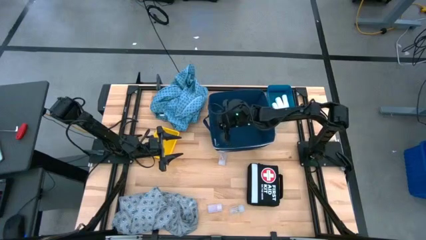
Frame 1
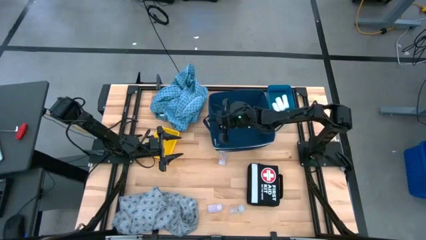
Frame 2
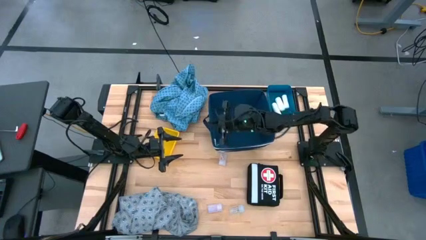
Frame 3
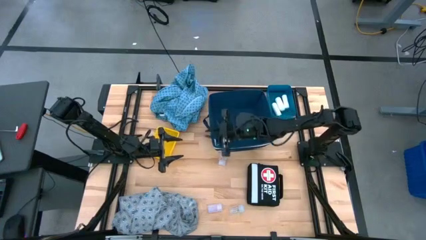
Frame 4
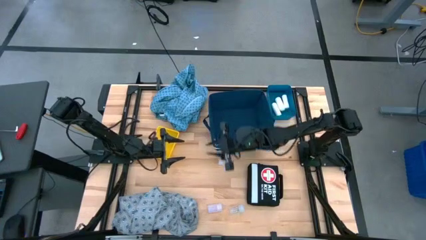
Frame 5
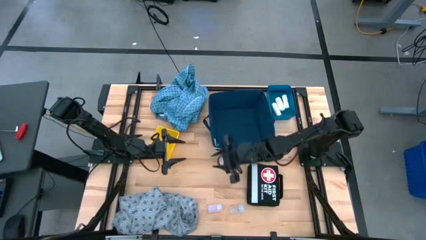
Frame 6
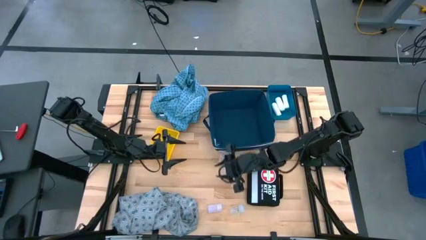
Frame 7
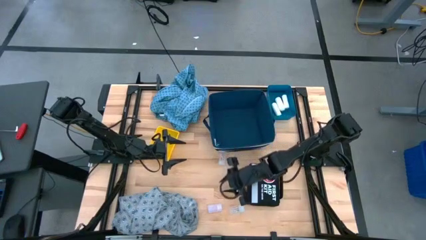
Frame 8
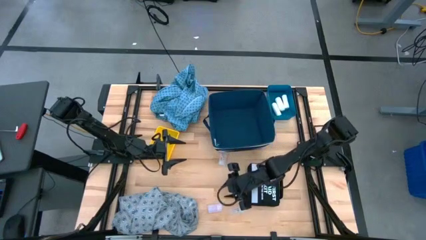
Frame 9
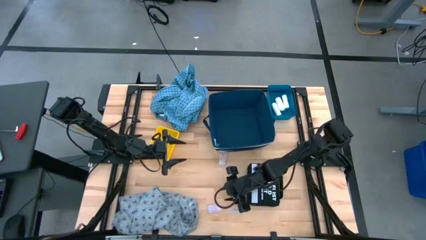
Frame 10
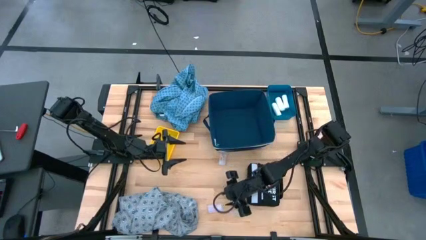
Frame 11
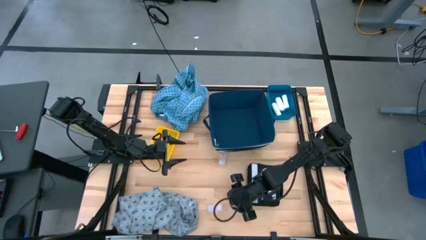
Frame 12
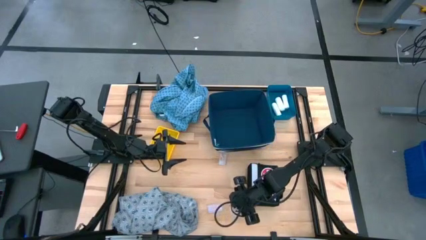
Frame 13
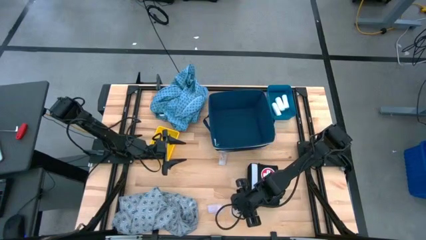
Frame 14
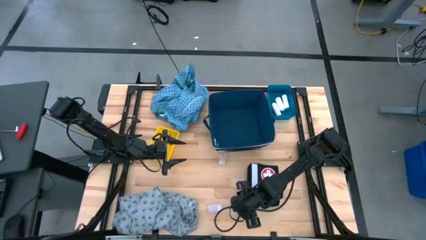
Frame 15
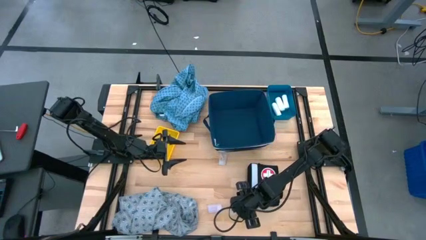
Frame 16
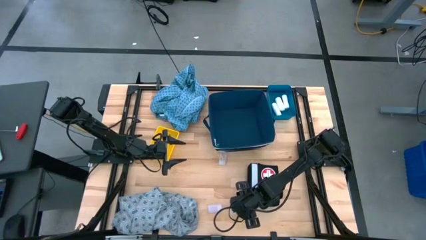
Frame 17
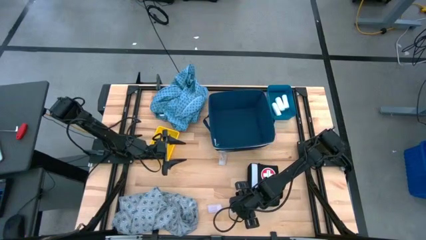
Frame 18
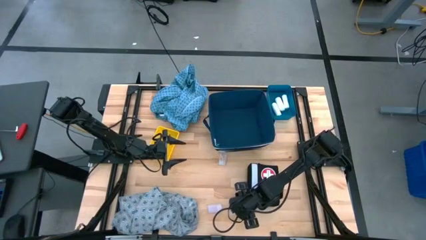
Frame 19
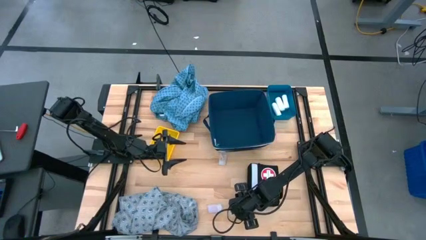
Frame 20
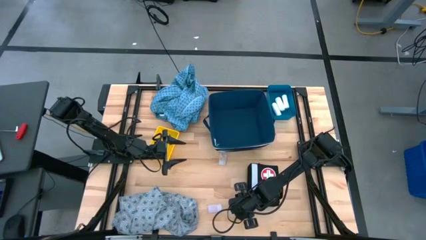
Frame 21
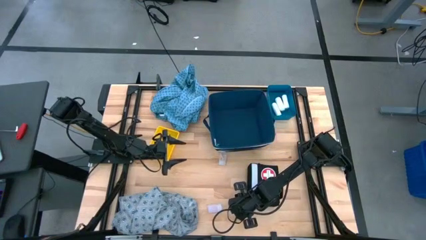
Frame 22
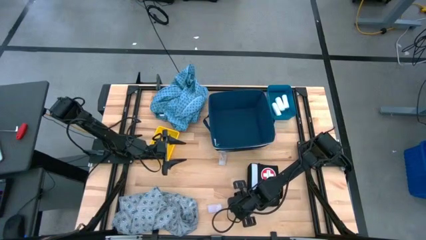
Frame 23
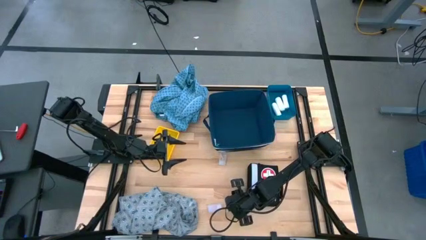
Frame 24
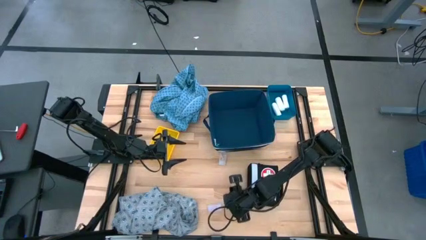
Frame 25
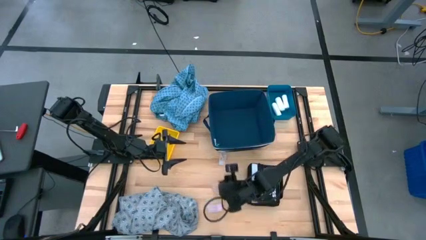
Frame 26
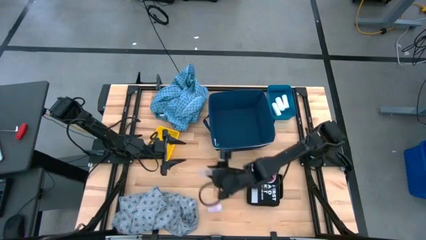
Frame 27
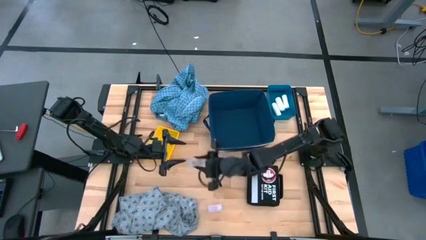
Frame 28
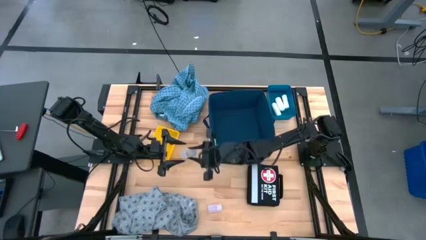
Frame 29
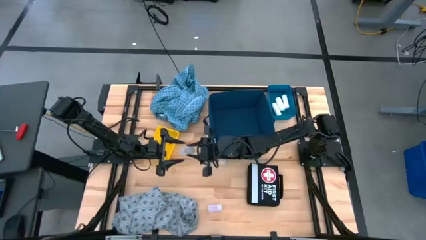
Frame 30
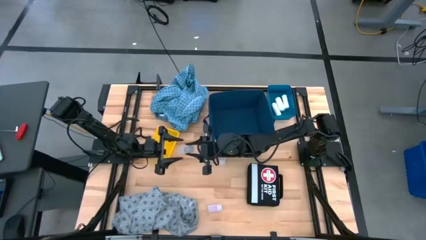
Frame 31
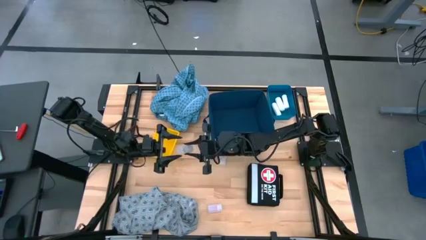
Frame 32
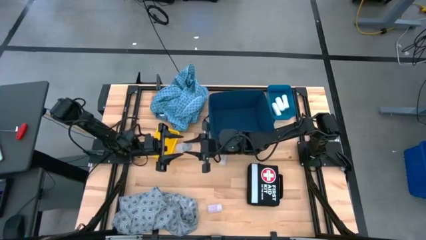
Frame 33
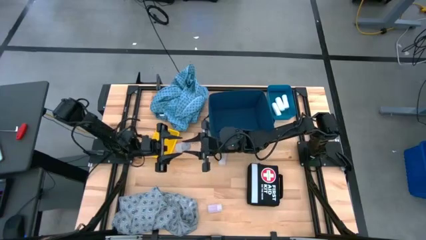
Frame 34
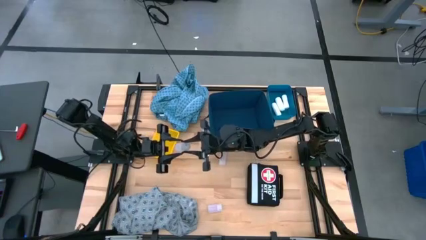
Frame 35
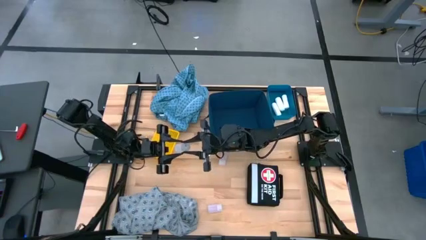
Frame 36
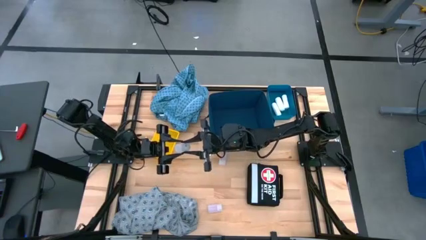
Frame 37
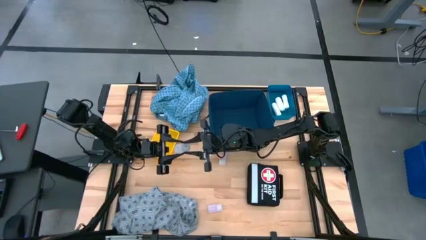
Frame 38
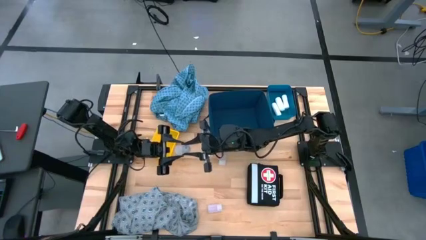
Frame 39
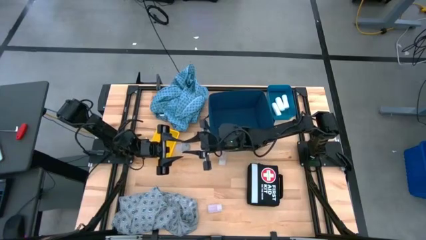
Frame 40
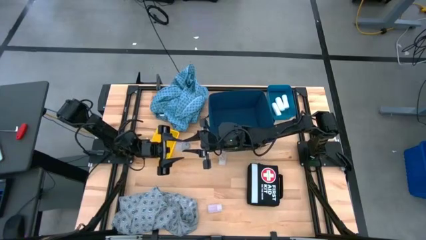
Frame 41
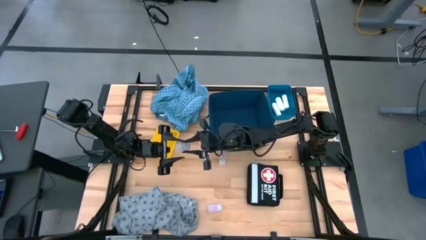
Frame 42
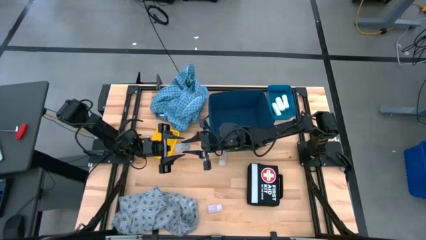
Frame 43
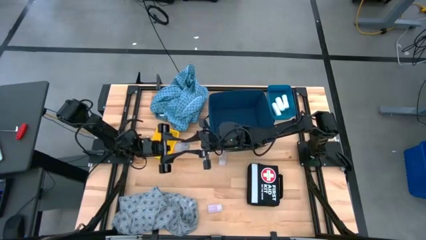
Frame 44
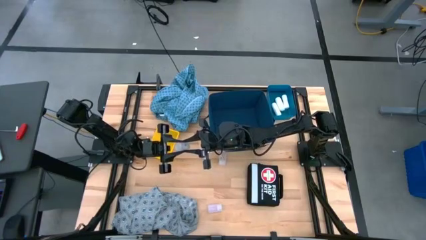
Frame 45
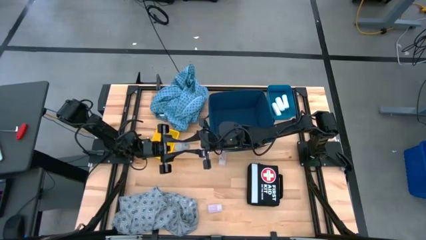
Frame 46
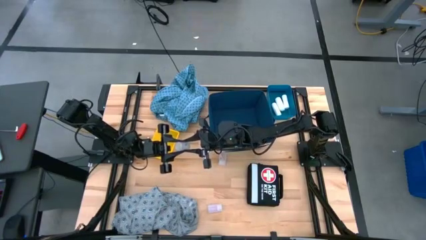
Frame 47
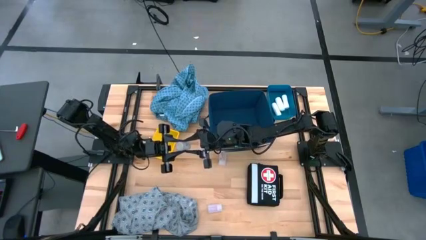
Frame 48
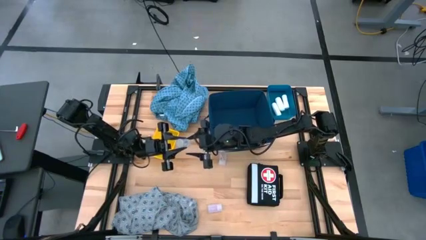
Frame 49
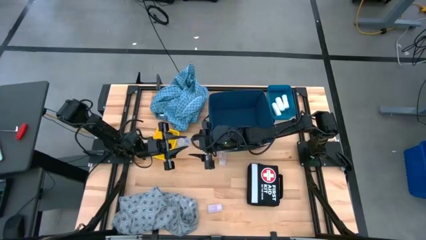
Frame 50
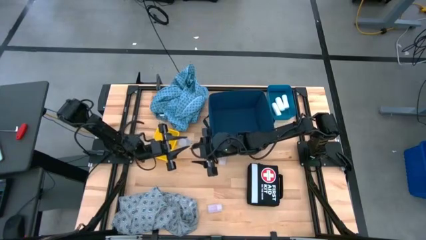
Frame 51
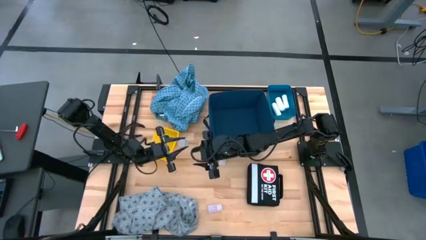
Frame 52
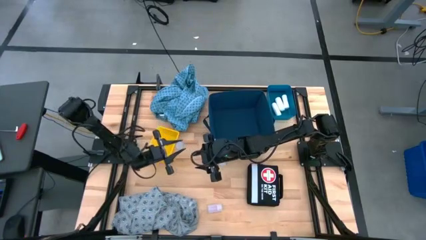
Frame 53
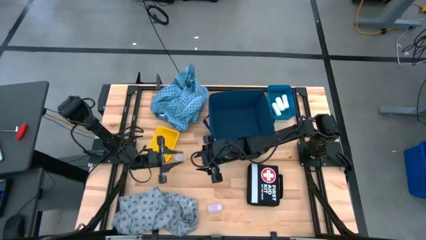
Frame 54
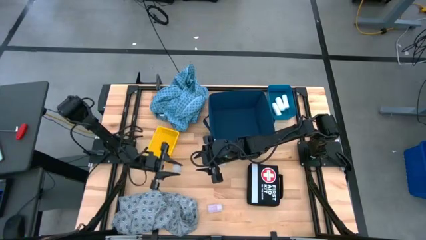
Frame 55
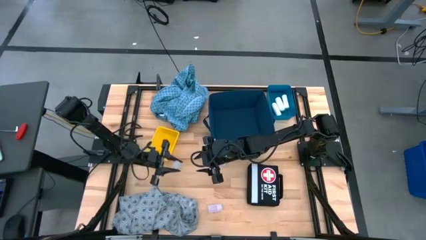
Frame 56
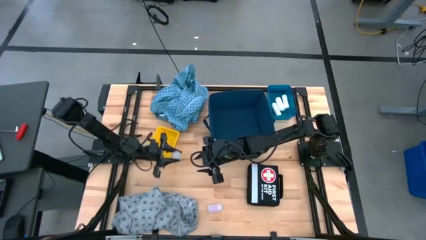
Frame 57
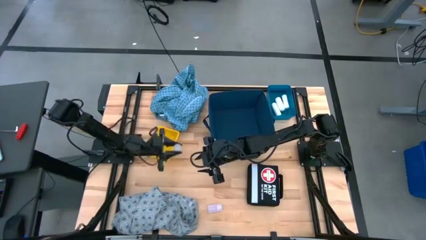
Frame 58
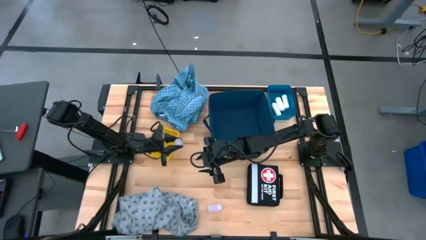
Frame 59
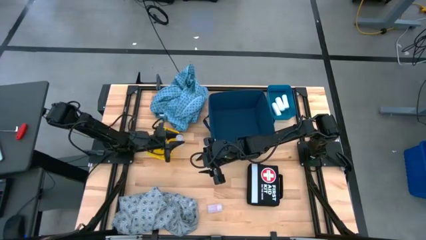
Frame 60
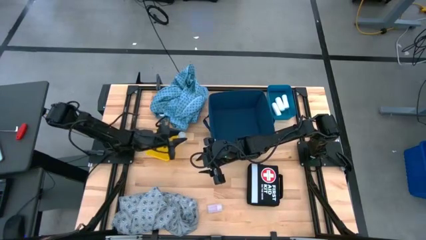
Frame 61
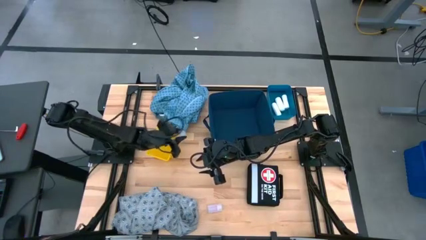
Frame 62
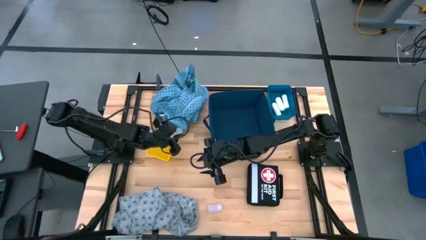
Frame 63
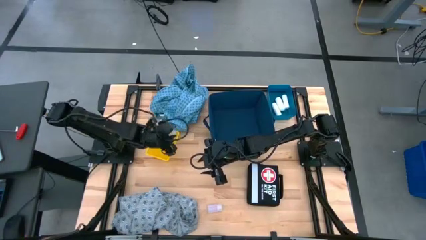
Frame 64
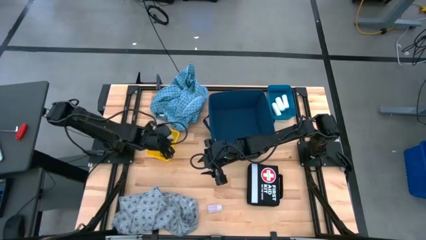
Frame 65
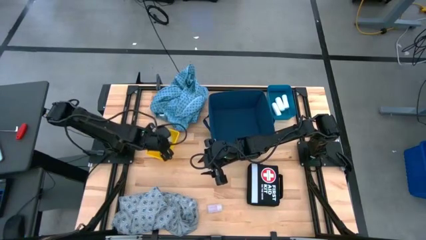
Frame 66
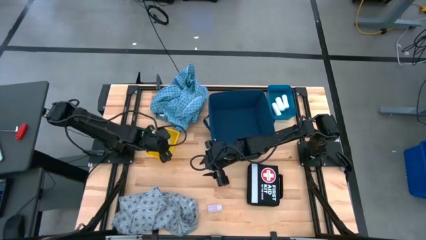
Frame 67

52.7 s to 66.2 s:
Task: Pick & place medical supplies in basket/bin
Put the bottom right transparent pill bottle into the yellow bin

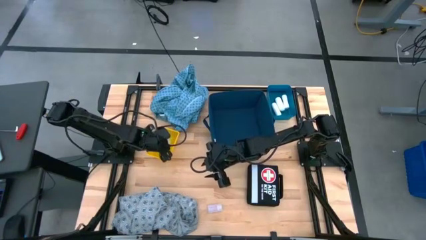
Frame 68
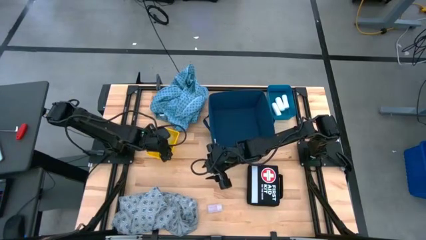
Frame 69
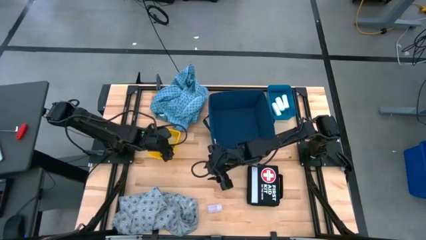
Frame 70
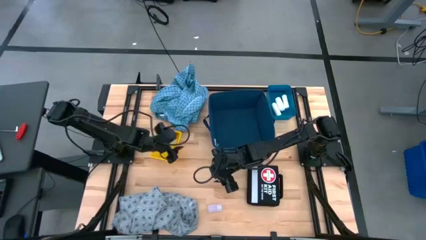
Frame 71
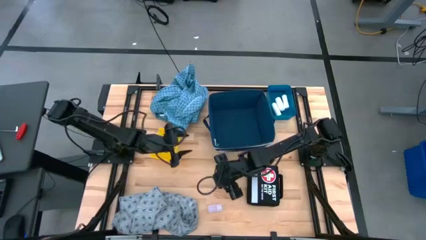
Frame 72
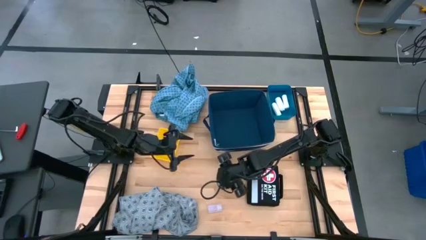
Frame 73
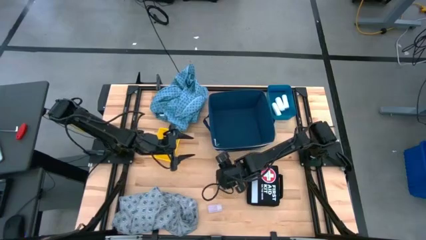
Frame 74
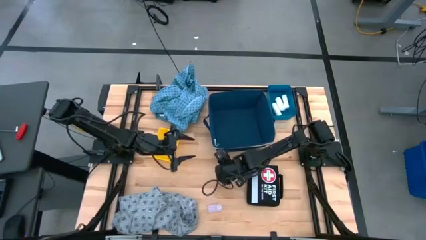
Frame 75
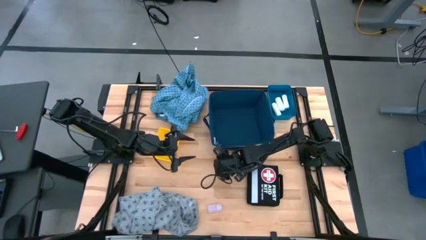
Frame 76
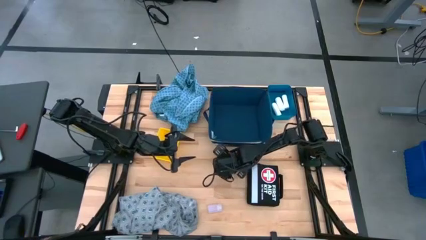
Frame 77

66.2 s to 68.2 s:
Put the top transparent pill bottle into the yellow bin
